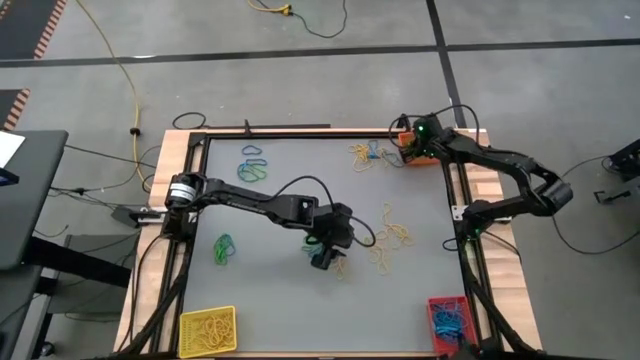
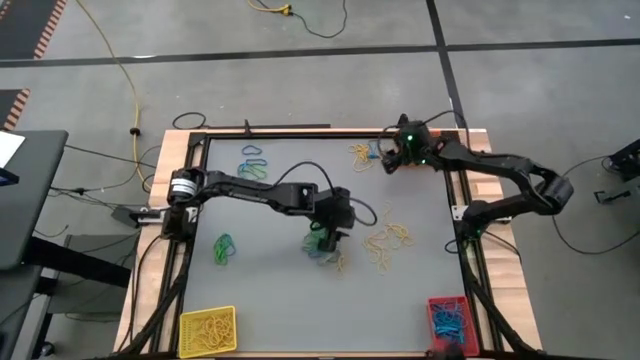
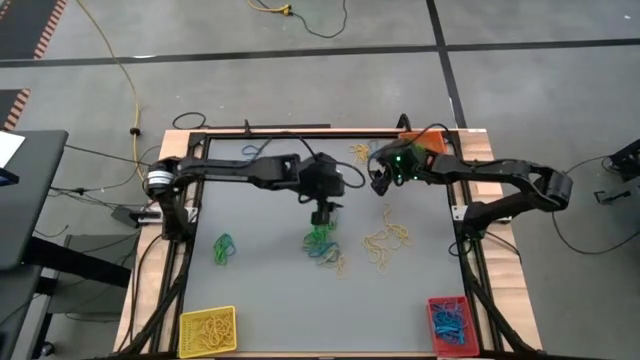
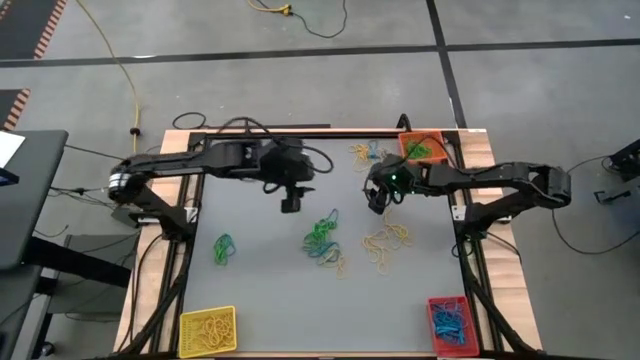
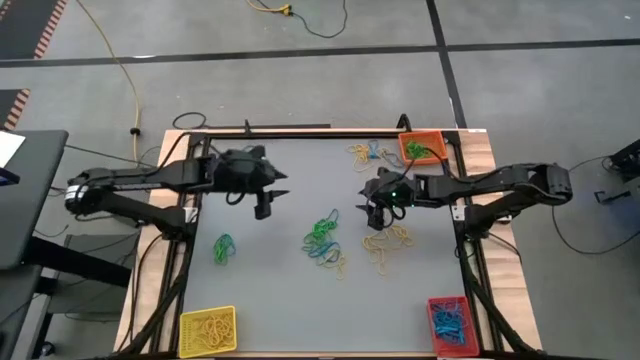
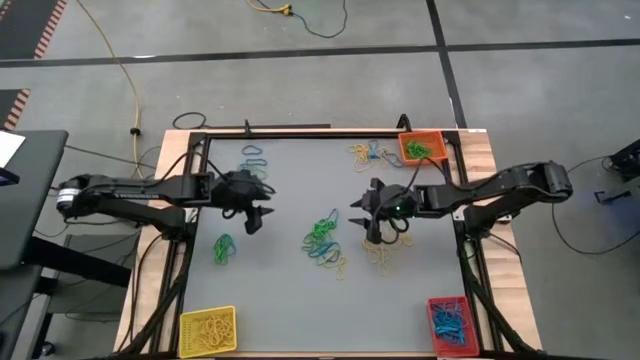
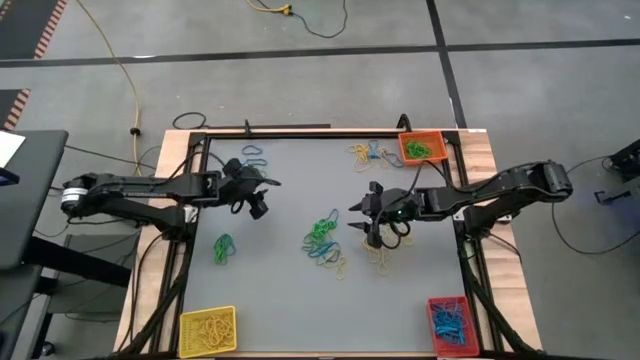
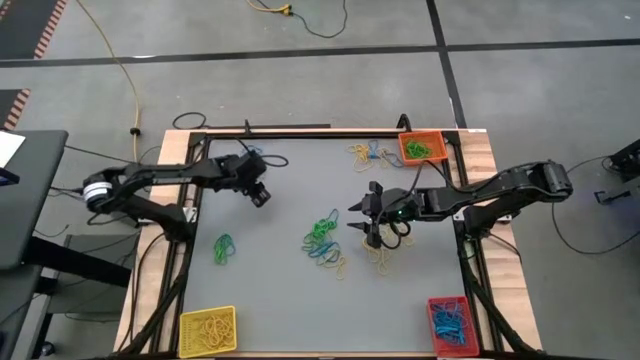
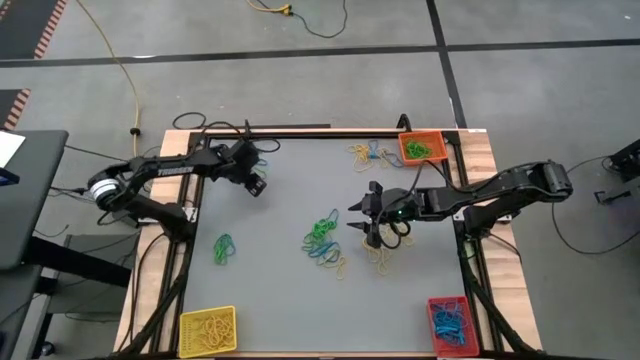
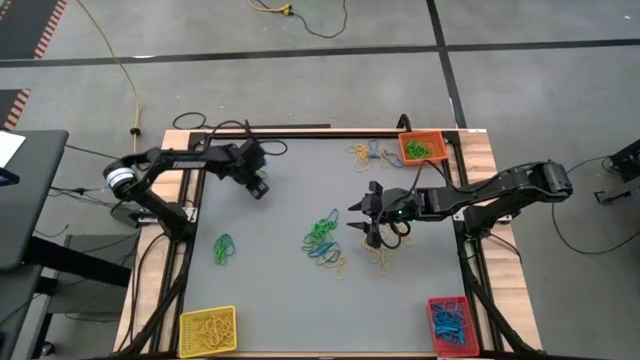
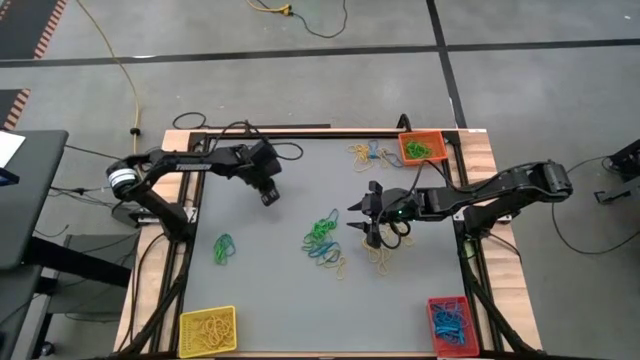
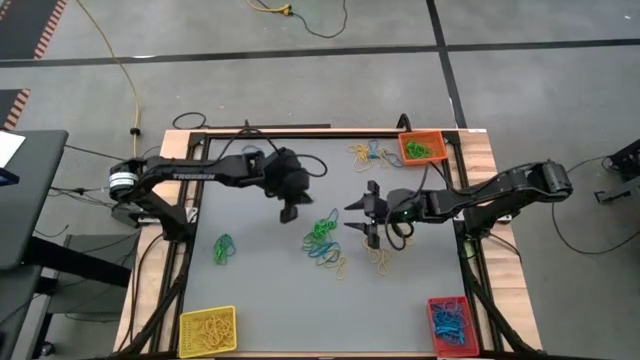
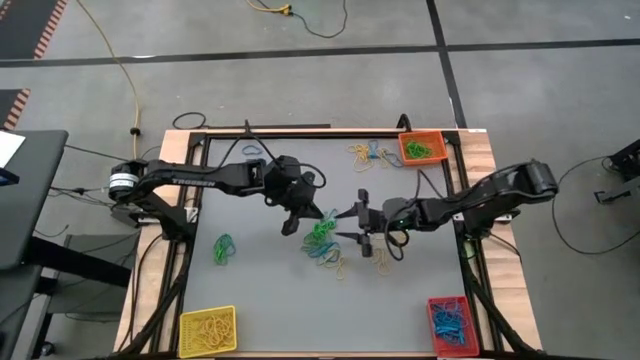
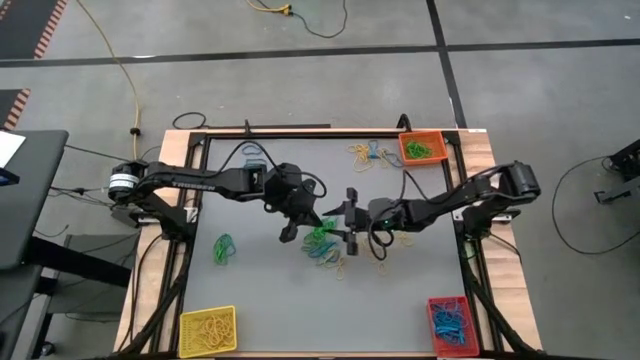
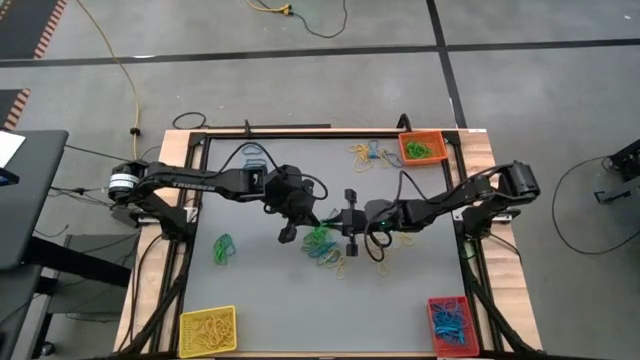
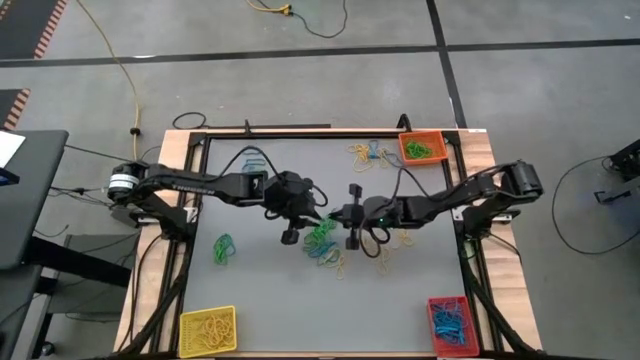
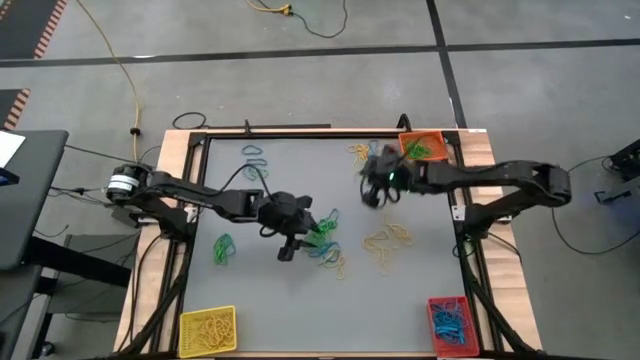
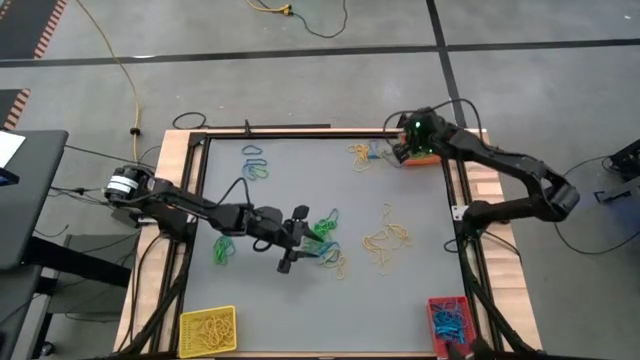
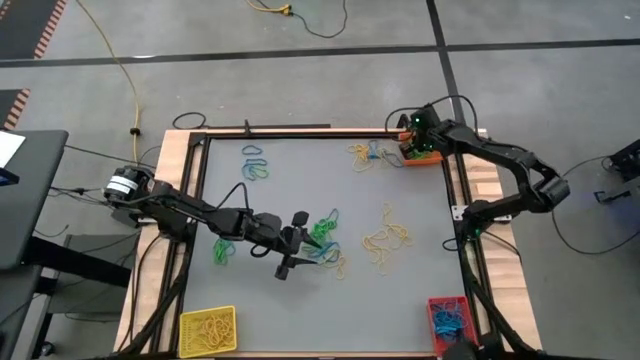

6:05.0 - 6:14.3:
Task: Sort rubber bands into baskets
Put the green rubber band into the orange bin

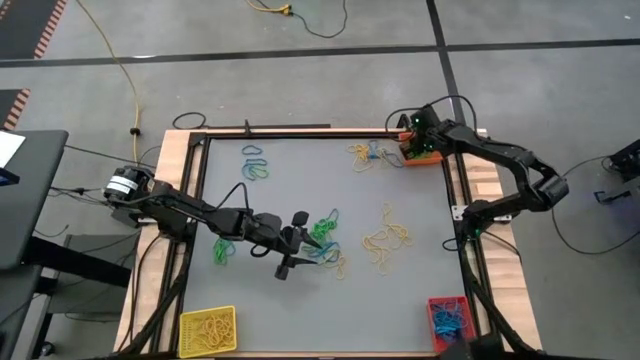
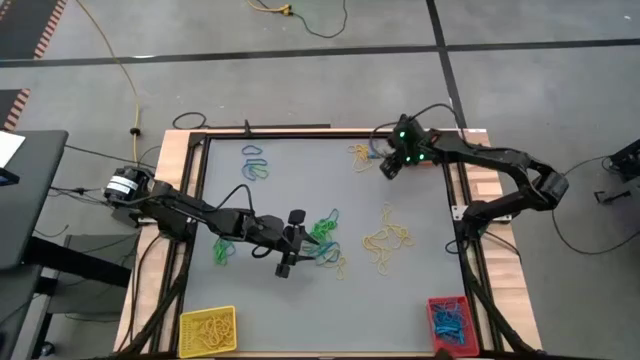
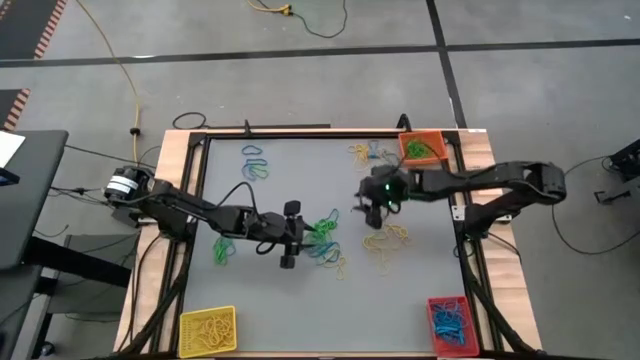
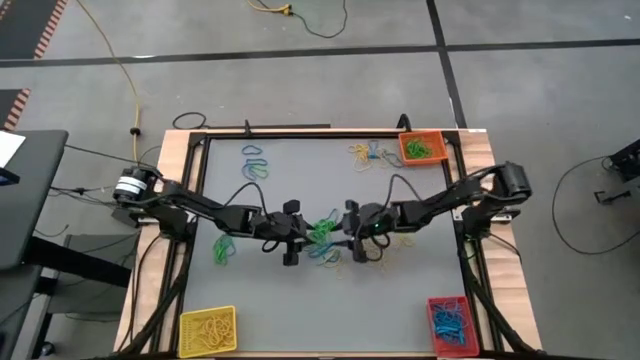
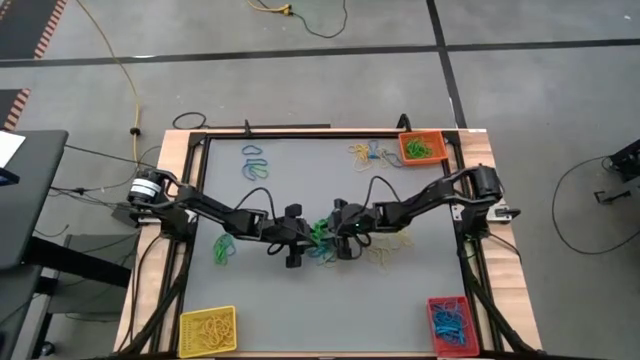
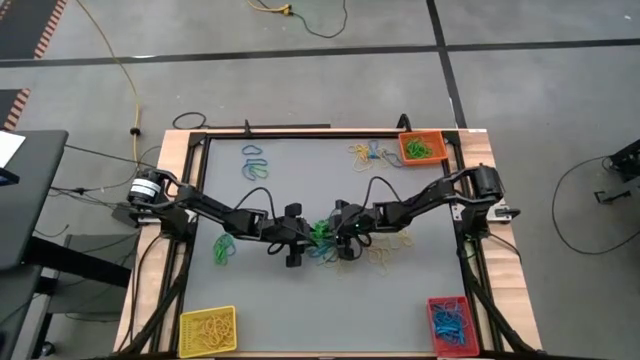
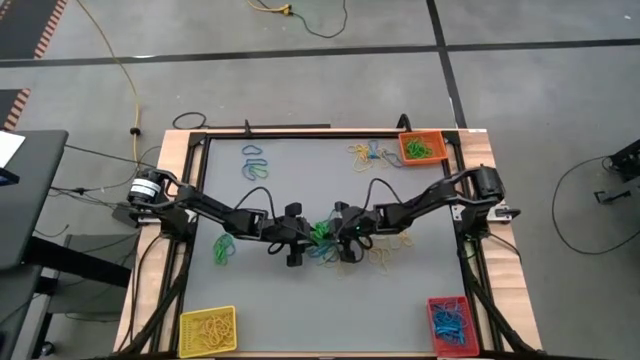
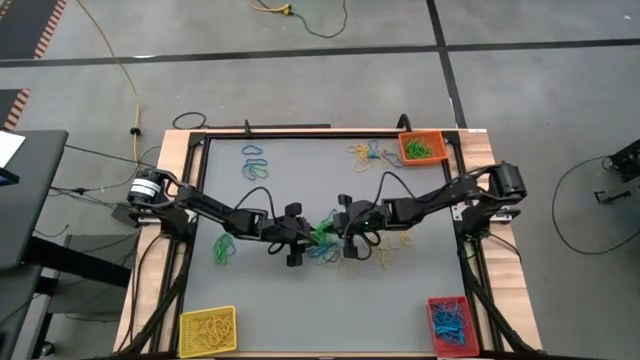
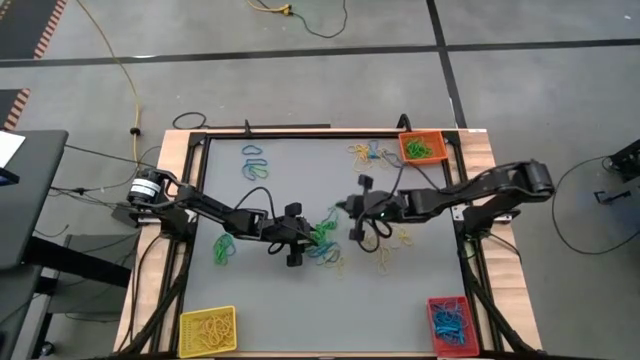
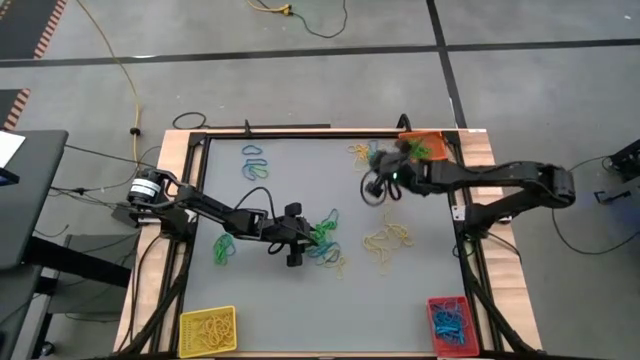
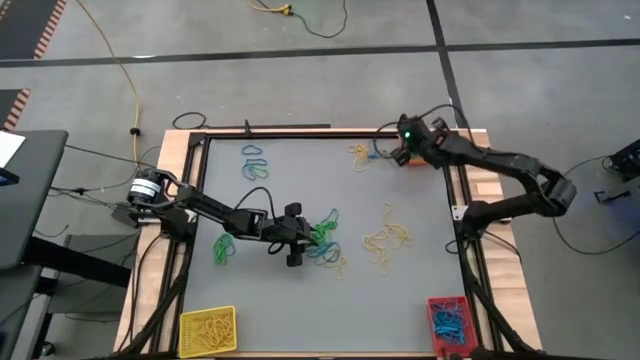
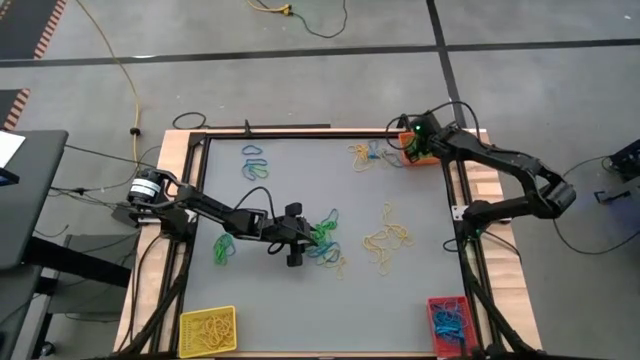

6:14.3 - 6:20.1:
Put the green rubber band into the orange bin

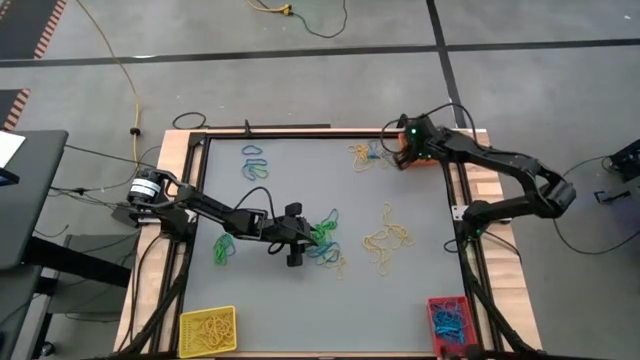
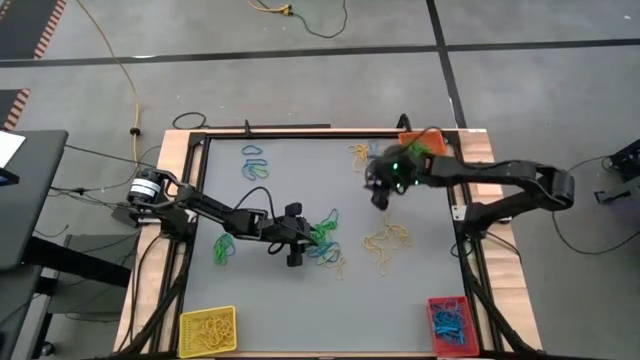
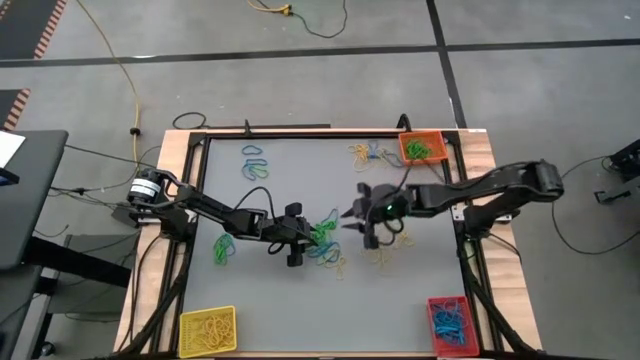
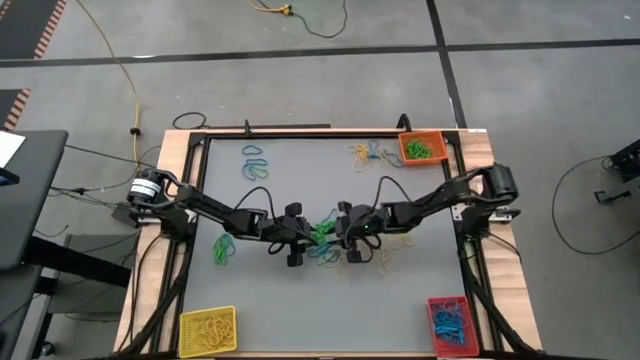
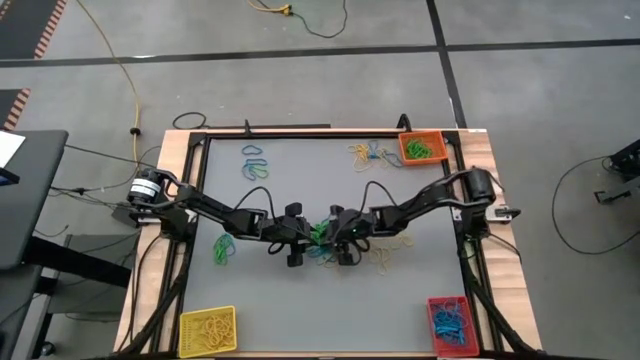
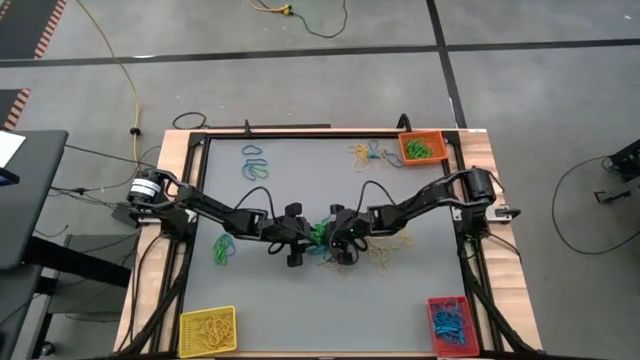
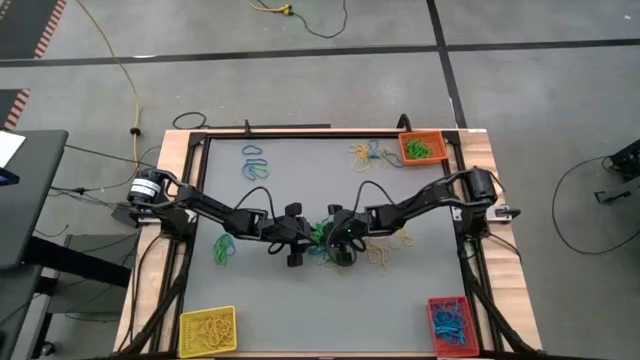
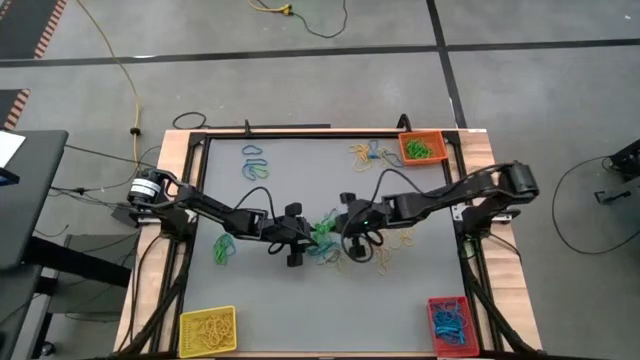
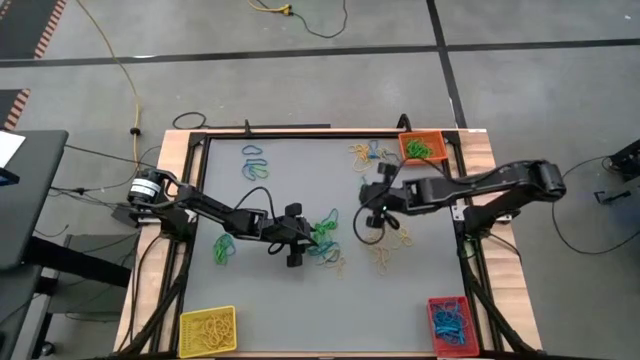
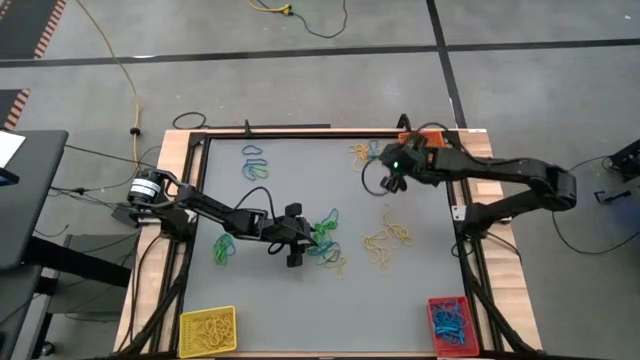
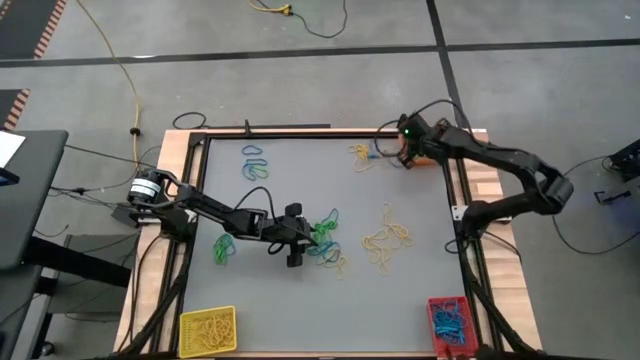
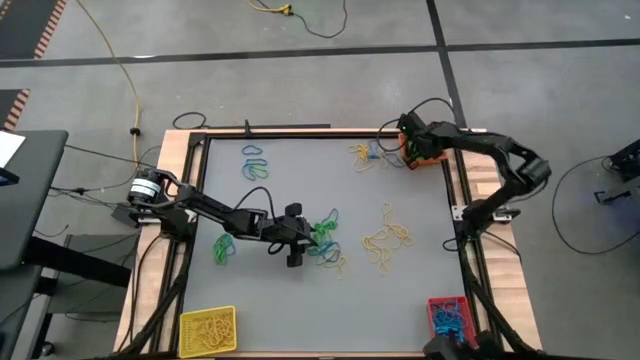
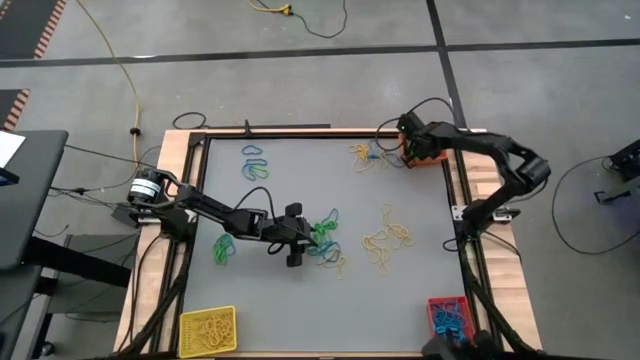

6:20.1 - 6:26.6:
Put the green rubber band into the orange bin
